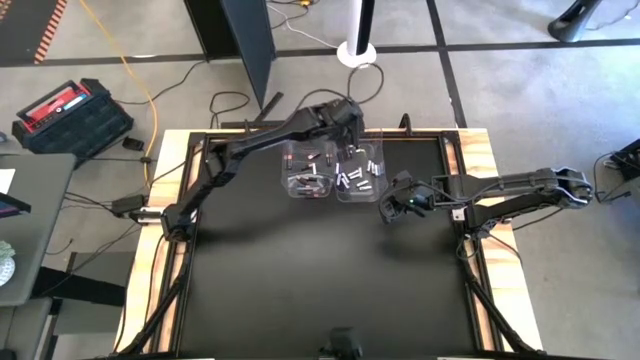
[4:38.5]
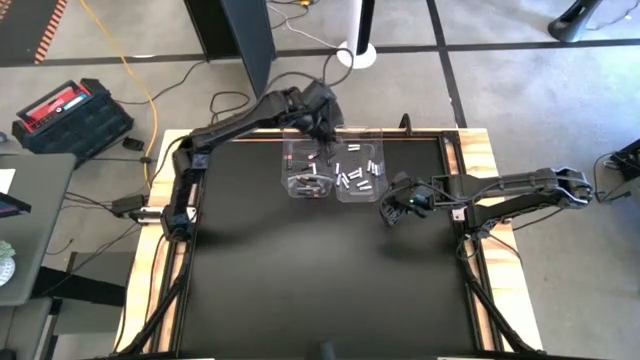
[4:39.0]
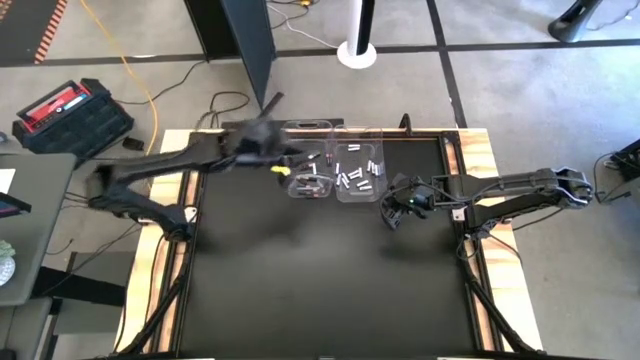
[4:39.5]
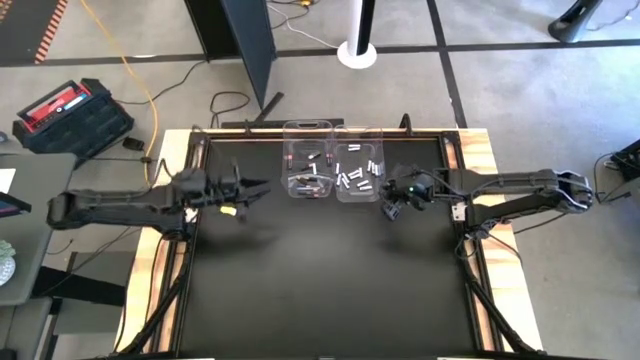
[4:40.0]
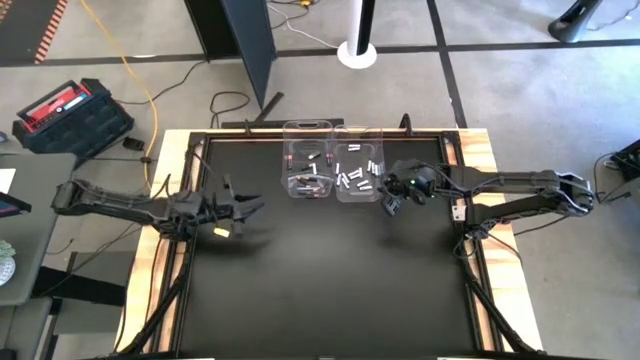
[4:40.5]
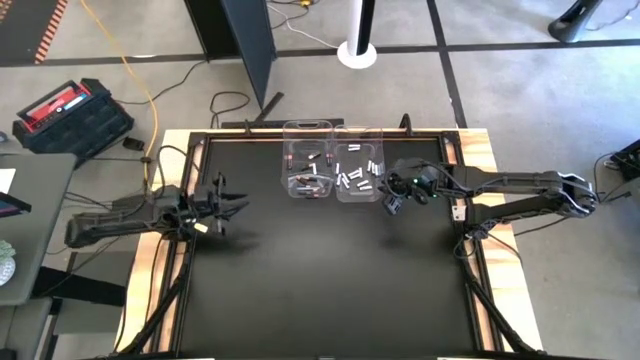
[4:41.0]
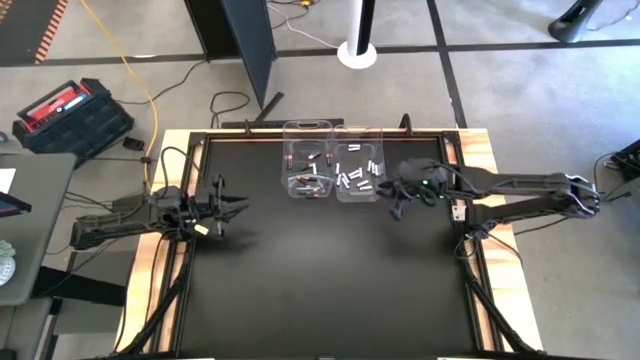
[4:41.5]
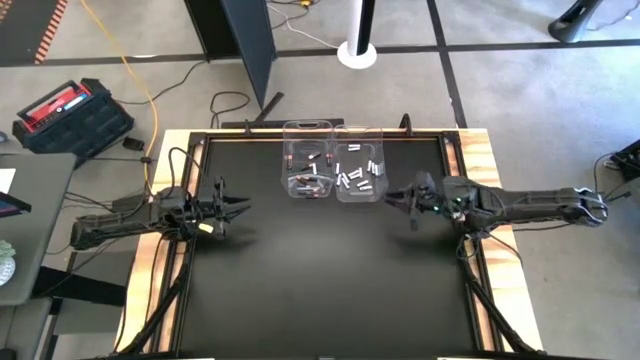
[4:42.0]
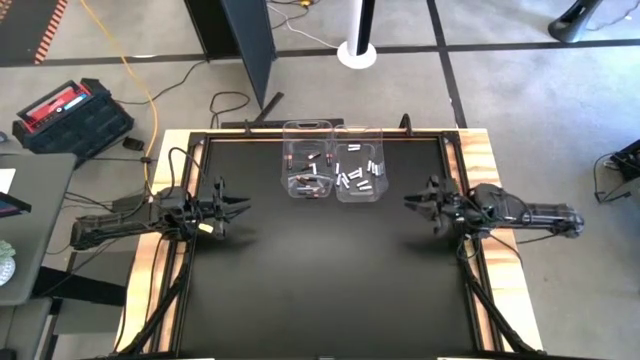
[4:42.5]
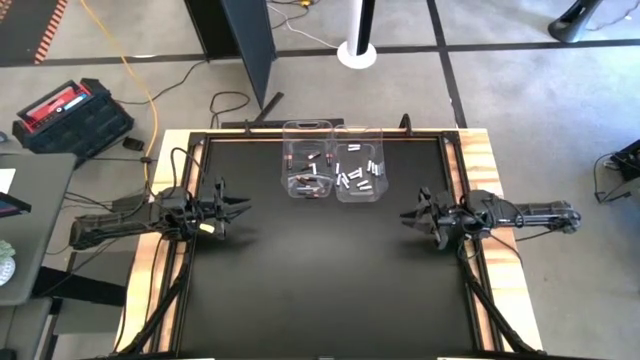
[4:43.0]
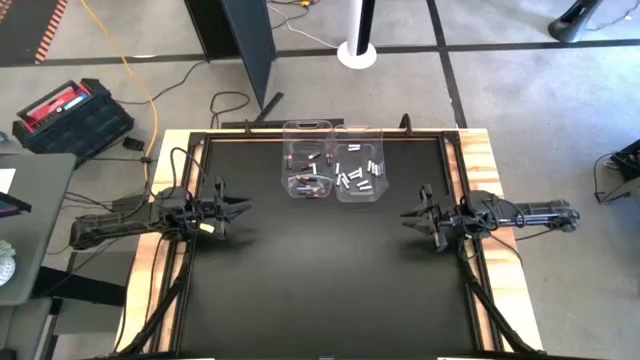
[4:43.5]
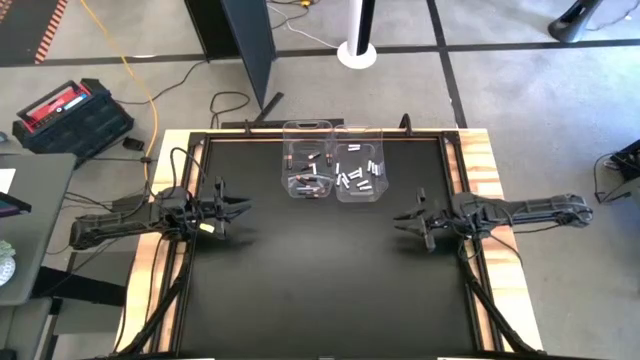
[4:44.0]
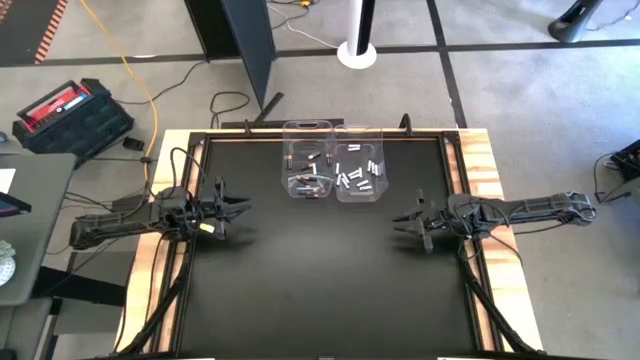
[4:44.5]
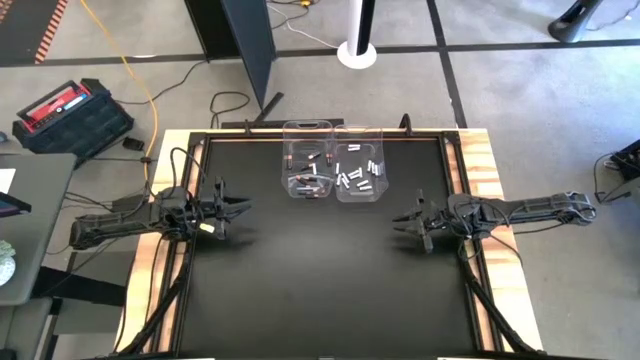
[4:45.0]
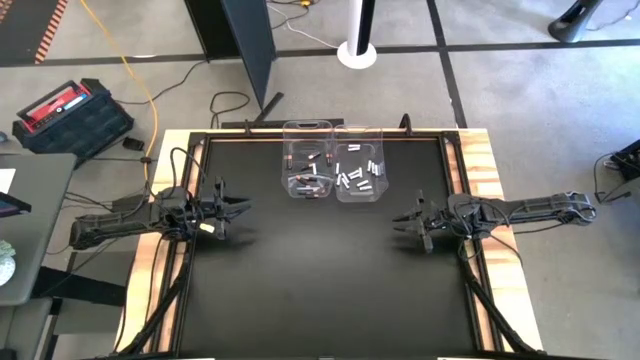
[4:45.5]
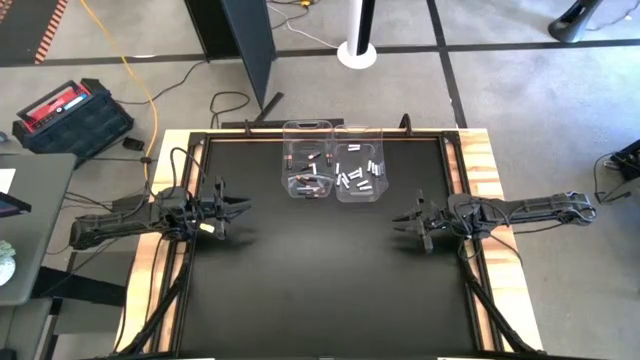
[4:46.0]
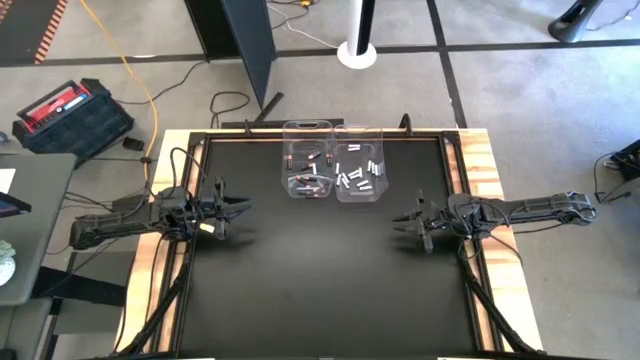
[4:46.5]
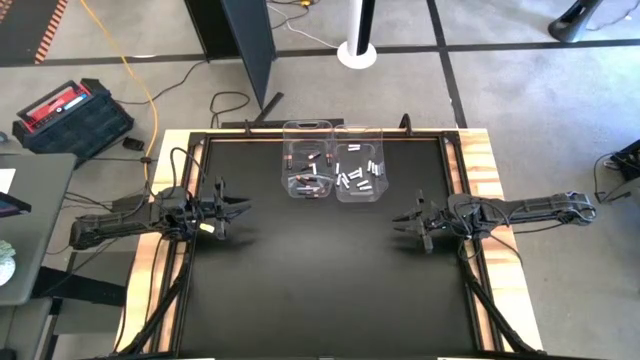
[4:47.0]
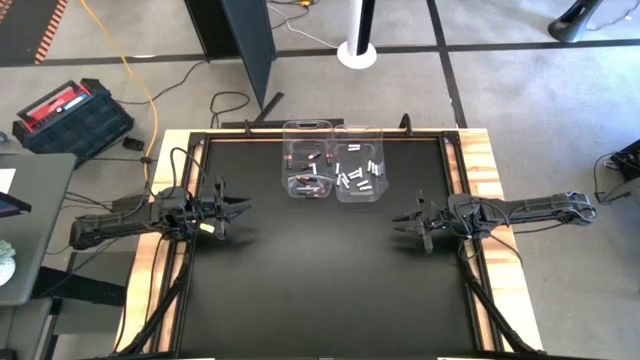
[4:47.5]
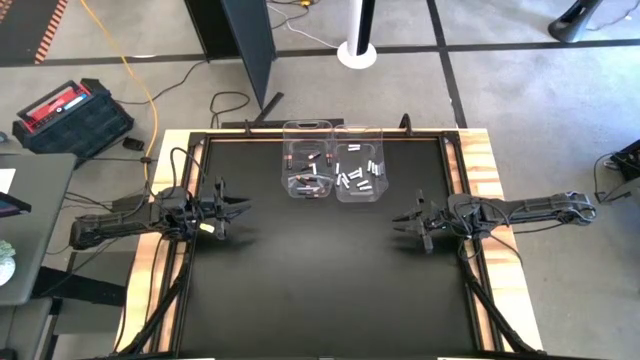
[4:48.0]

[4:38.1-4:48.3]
Task: Sort batteries
Return to Home Position

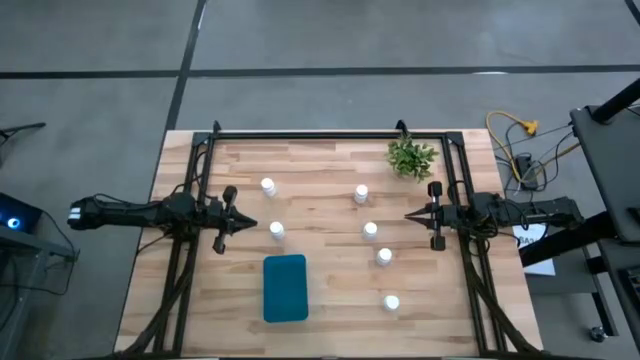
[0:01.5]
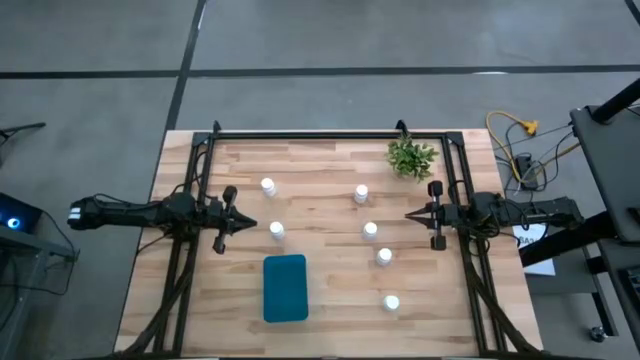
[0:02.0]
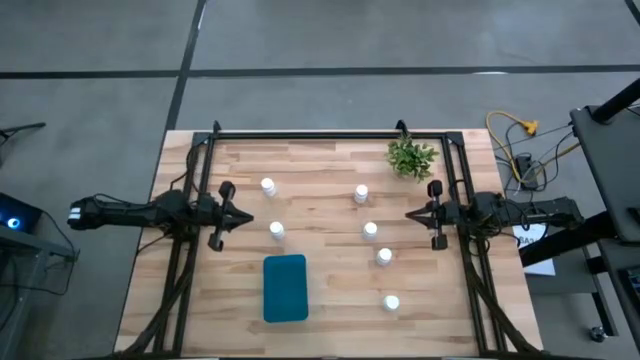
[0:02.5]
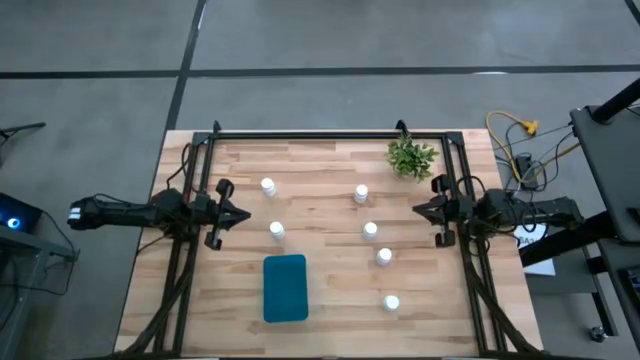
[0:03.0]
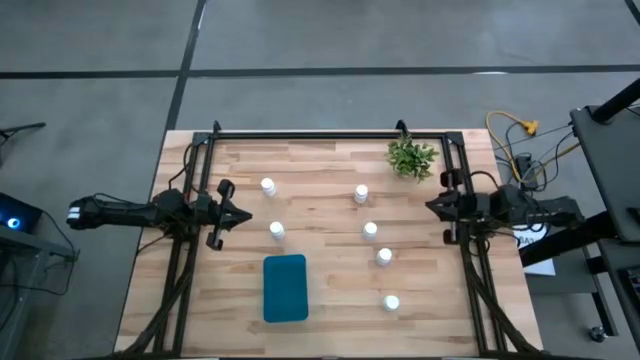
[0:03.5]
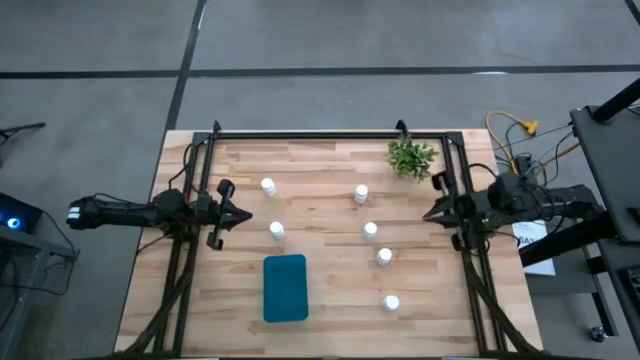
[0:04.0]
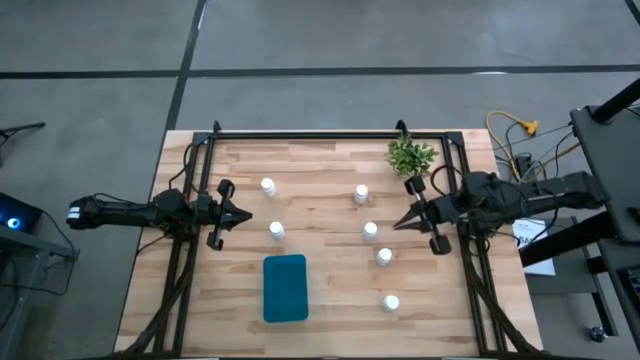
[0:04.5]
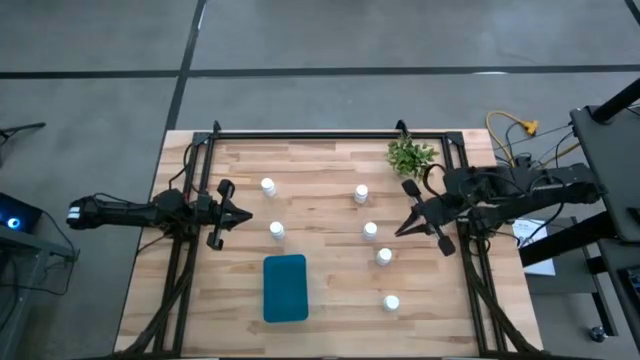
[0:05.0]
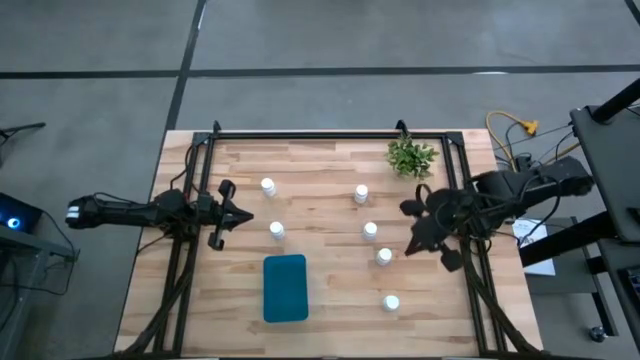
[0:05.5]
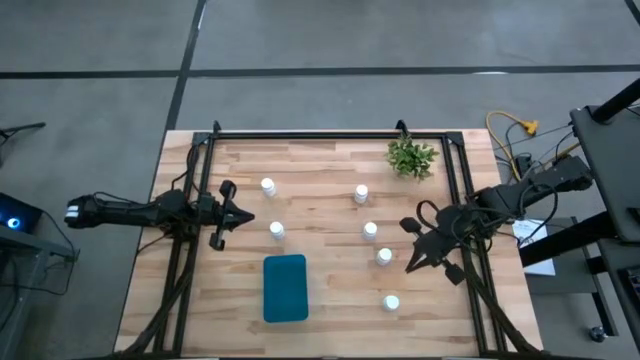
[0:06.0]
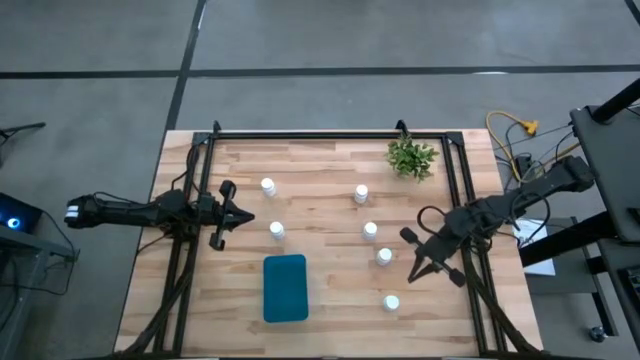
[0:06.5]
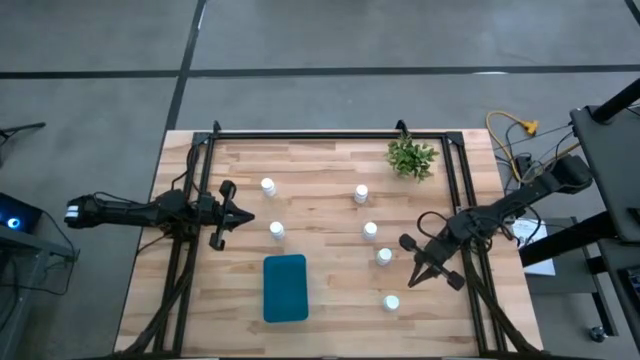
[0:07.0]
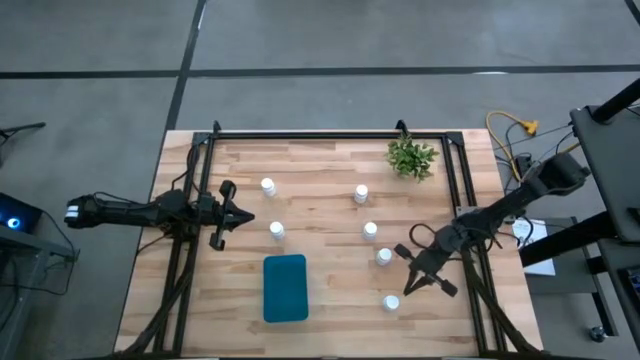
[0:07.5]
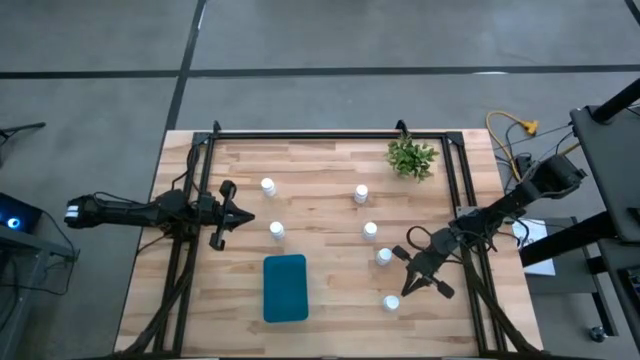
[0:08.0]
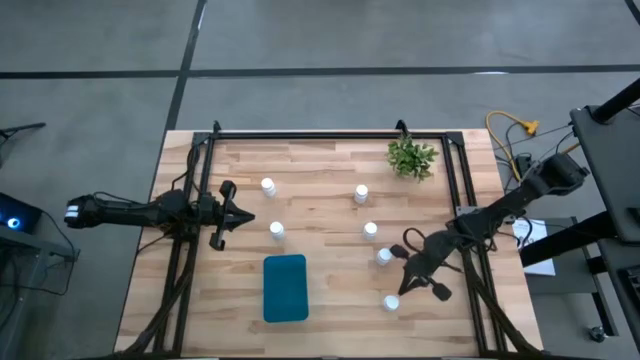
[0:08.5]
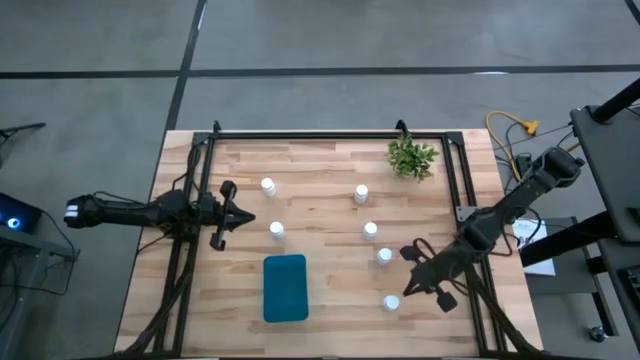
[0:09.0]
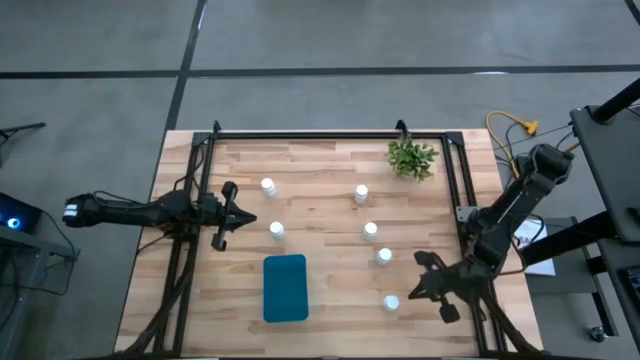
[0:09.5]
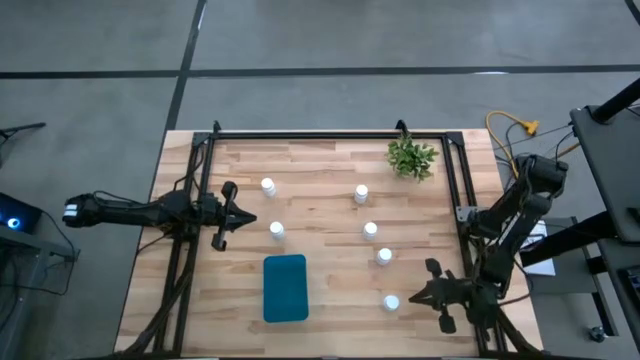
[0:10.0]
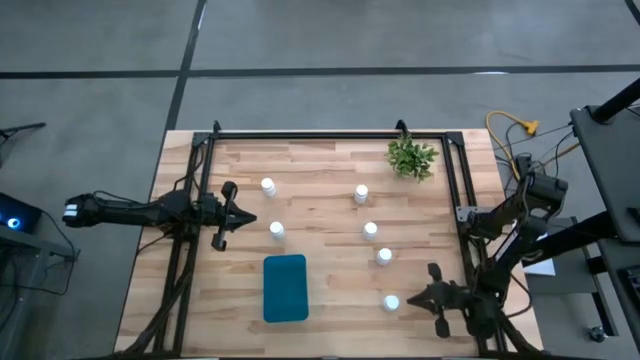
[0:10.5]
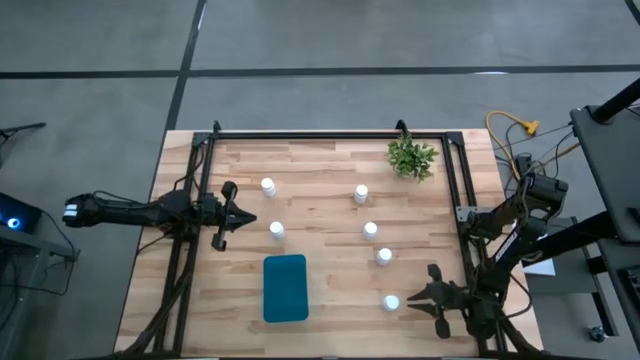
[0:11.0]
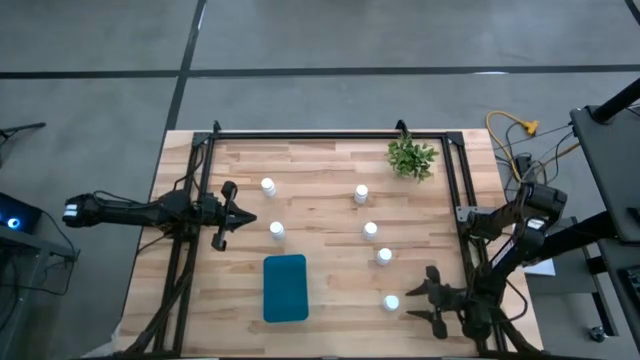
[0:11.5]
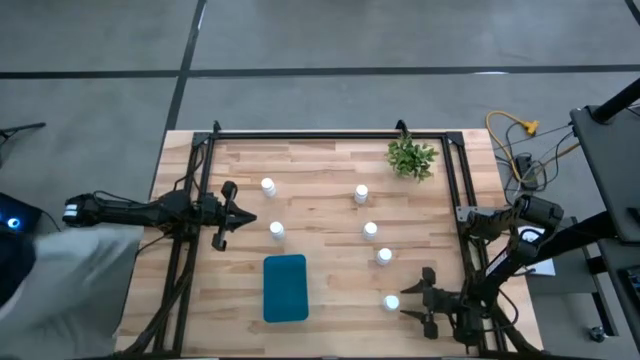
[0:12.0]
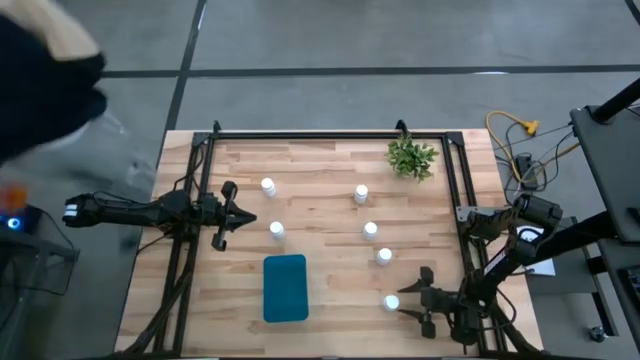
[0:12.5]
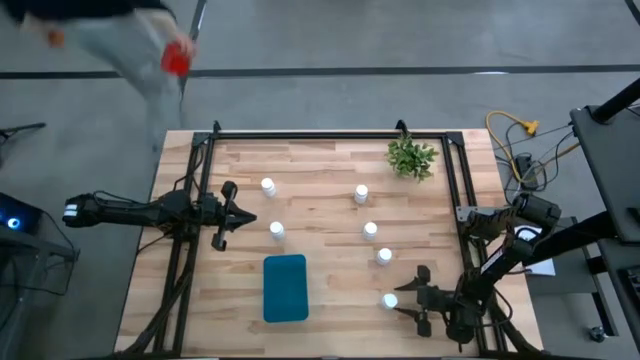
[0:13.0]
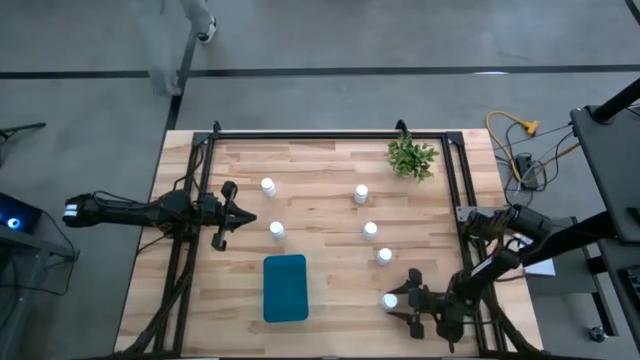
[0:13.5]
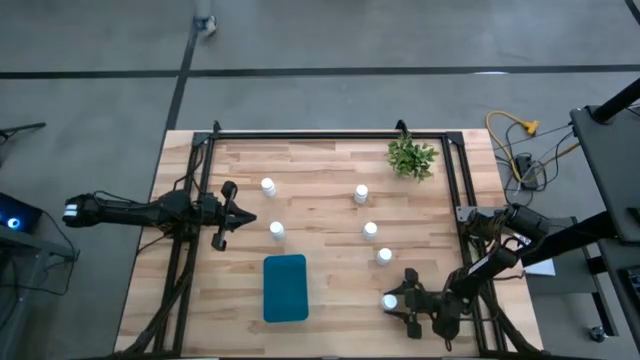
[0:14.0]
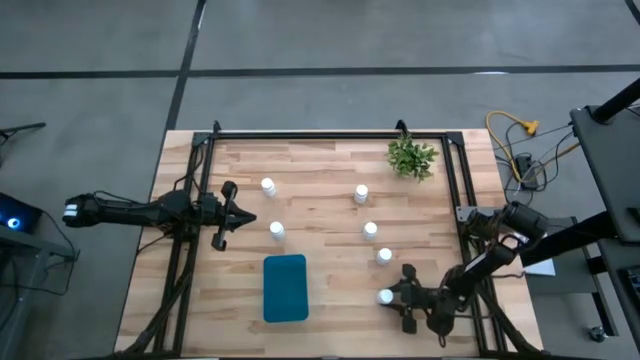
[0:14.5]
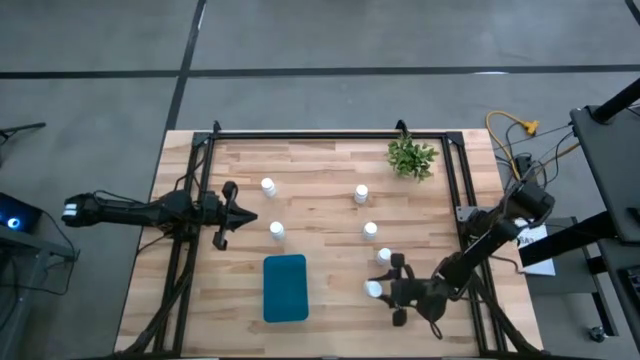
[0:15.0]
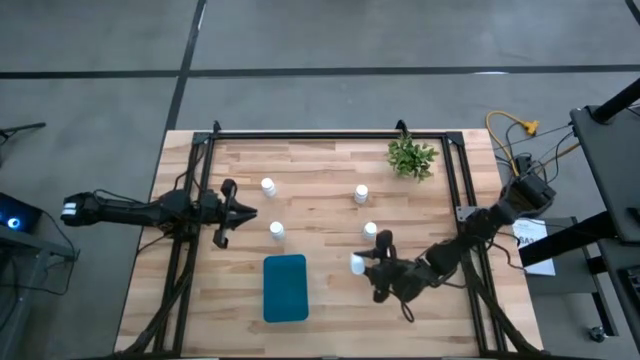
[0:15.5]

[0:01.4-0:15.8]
Task: Pick and place pill bottles into a basket
Put the white pill bottle into the blue bin
